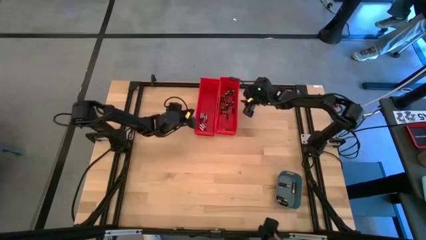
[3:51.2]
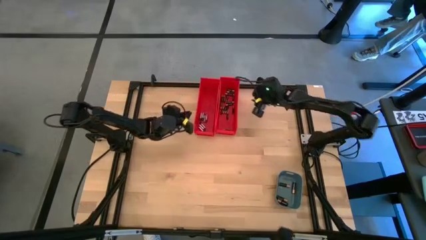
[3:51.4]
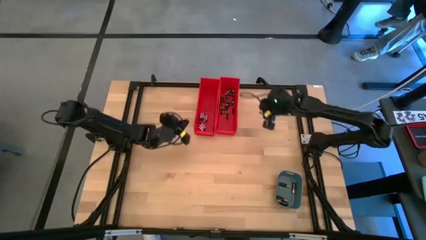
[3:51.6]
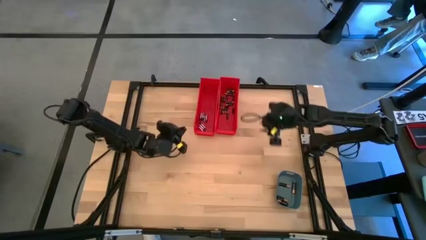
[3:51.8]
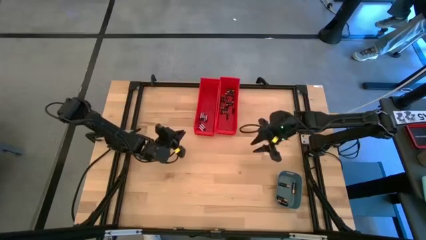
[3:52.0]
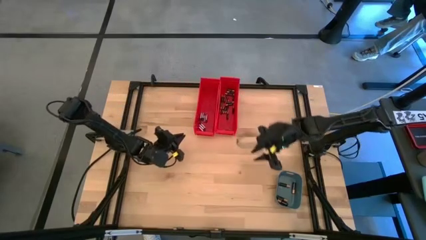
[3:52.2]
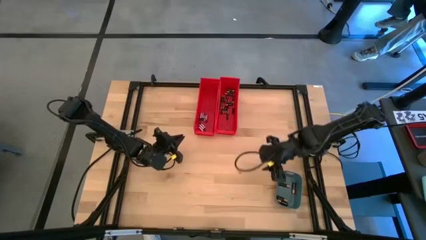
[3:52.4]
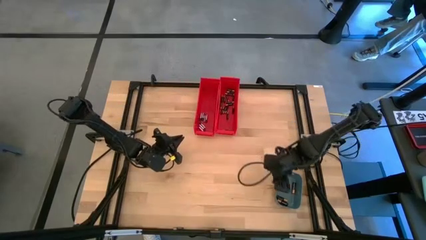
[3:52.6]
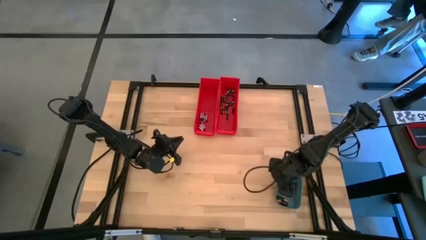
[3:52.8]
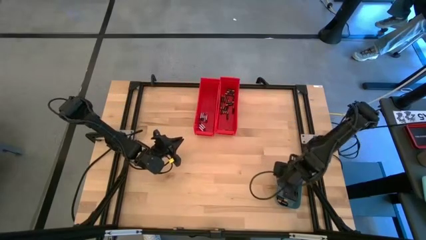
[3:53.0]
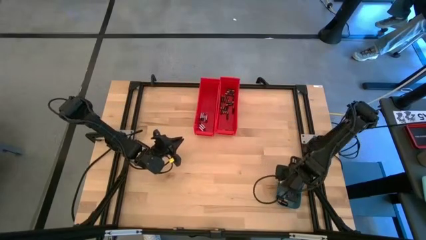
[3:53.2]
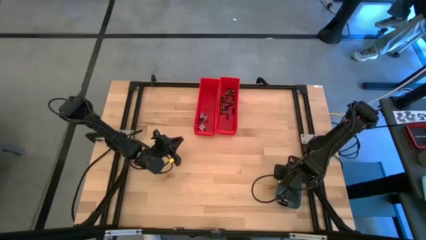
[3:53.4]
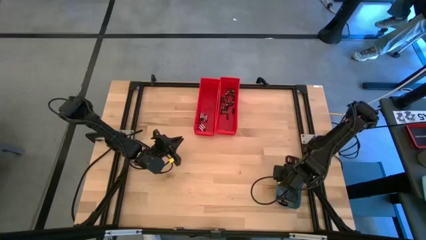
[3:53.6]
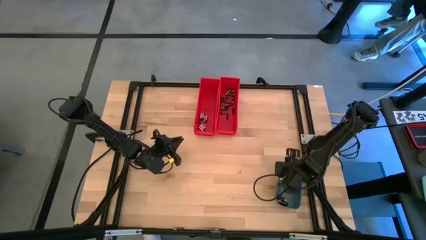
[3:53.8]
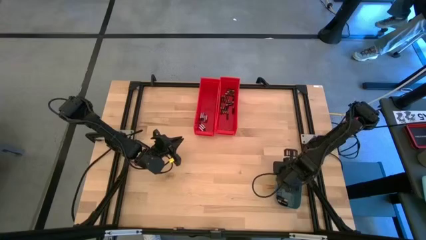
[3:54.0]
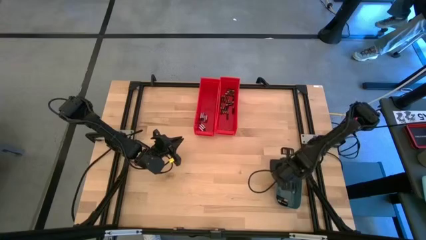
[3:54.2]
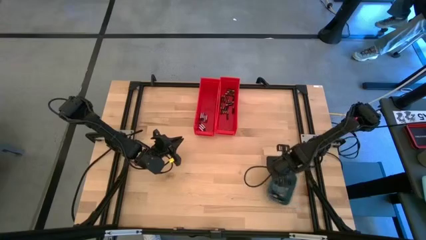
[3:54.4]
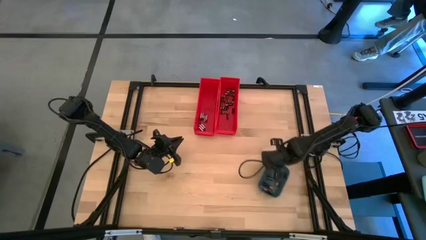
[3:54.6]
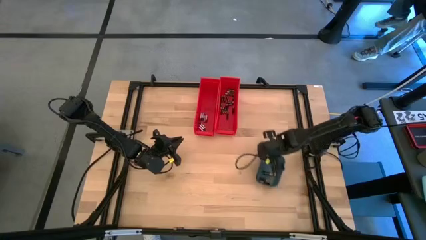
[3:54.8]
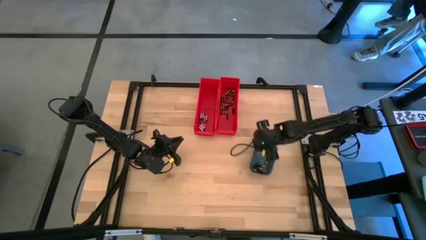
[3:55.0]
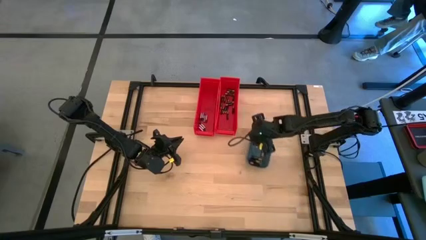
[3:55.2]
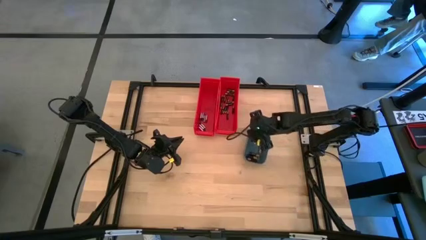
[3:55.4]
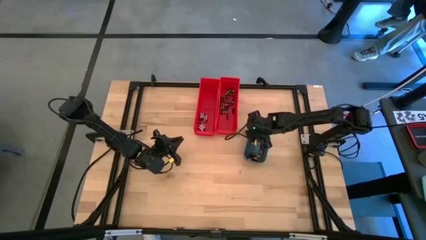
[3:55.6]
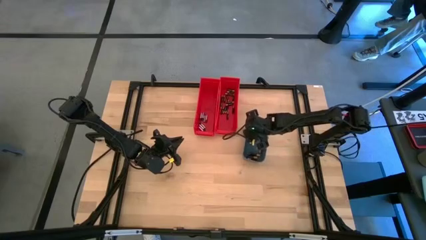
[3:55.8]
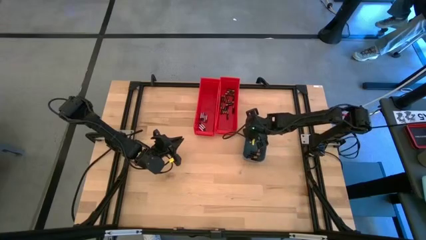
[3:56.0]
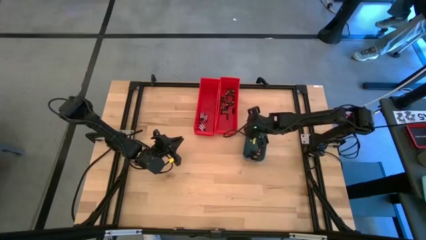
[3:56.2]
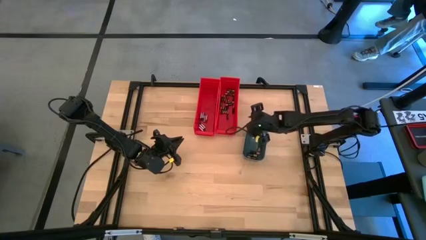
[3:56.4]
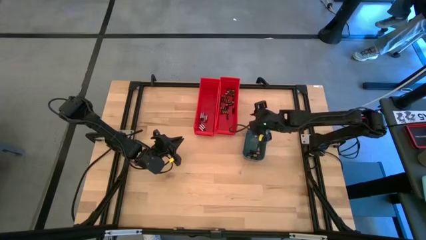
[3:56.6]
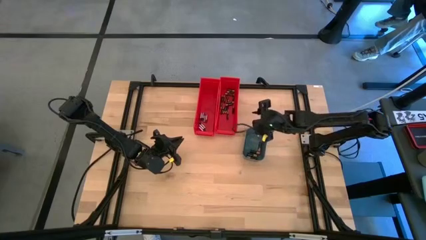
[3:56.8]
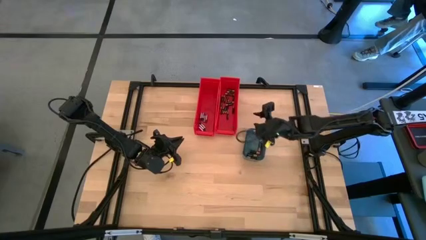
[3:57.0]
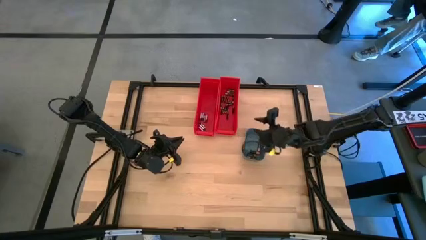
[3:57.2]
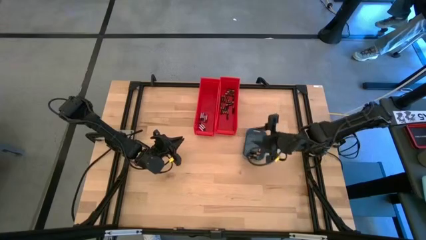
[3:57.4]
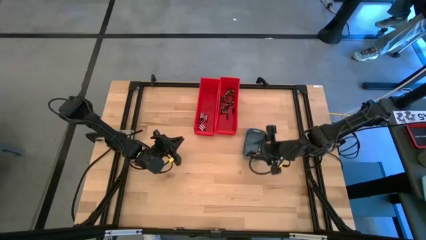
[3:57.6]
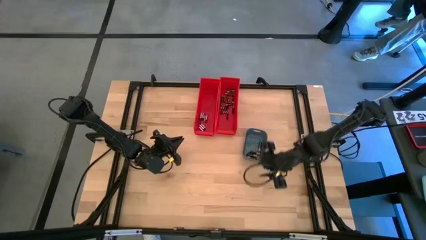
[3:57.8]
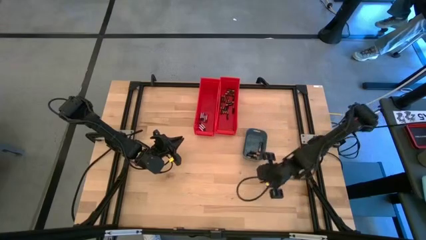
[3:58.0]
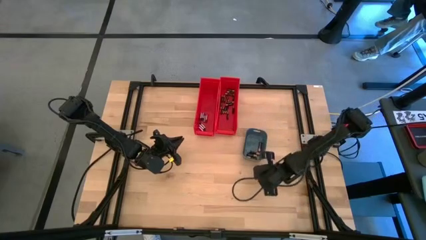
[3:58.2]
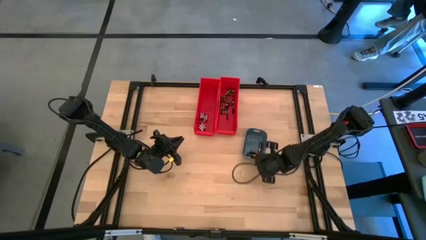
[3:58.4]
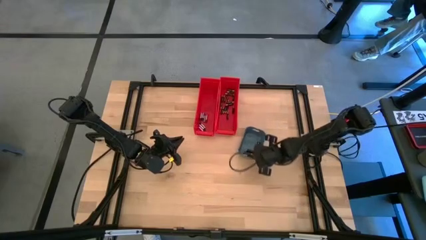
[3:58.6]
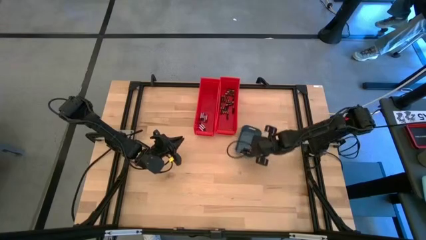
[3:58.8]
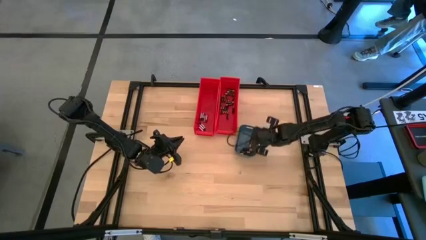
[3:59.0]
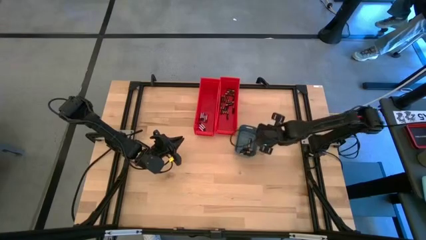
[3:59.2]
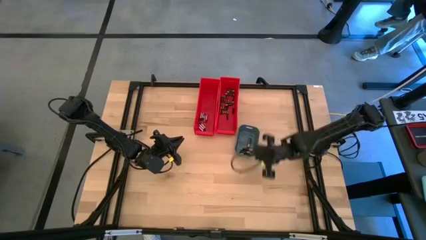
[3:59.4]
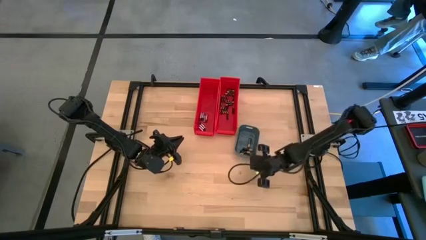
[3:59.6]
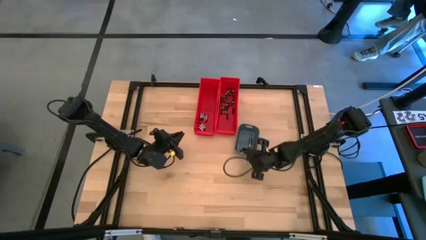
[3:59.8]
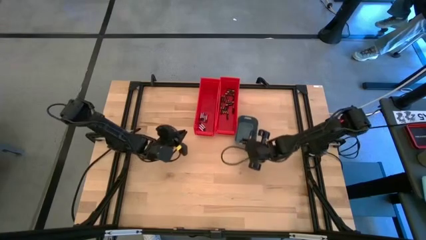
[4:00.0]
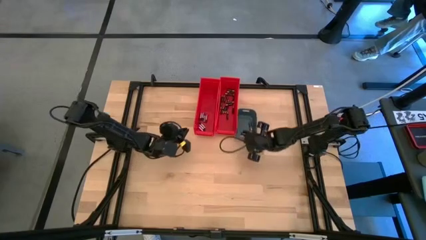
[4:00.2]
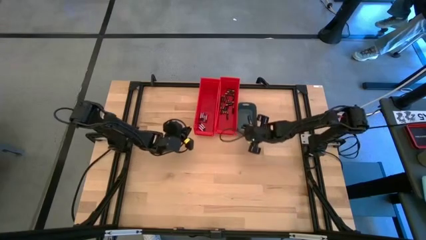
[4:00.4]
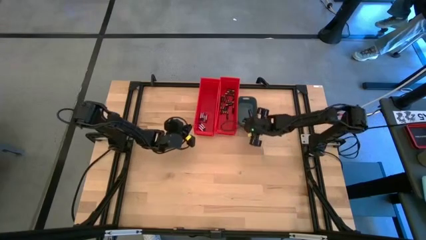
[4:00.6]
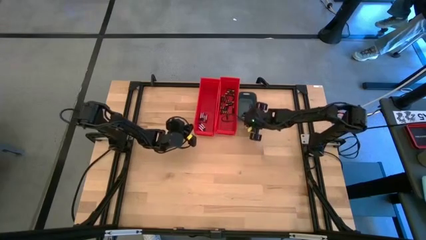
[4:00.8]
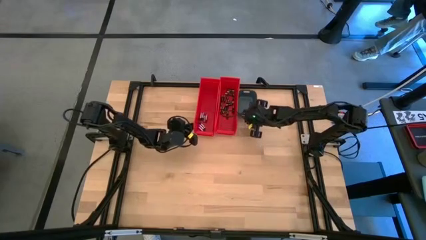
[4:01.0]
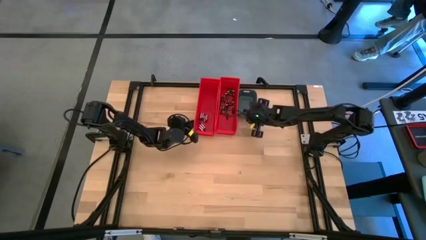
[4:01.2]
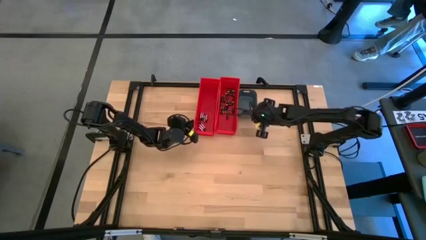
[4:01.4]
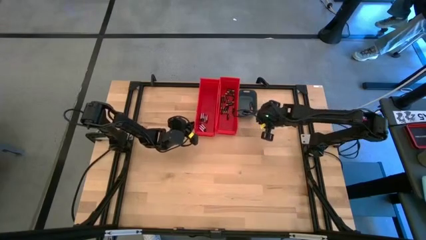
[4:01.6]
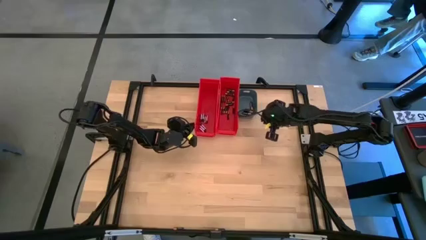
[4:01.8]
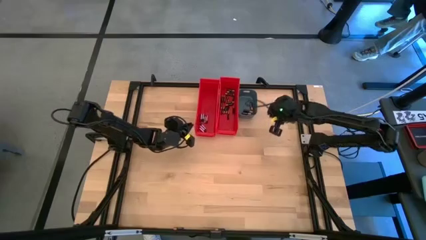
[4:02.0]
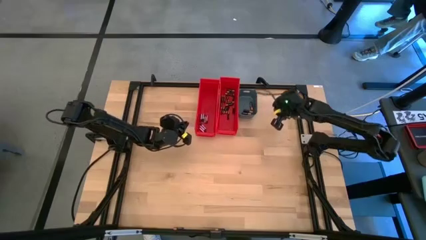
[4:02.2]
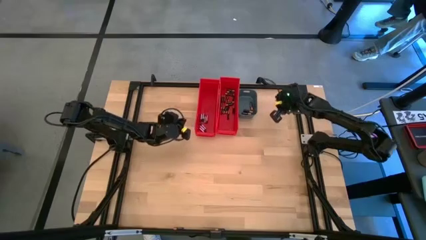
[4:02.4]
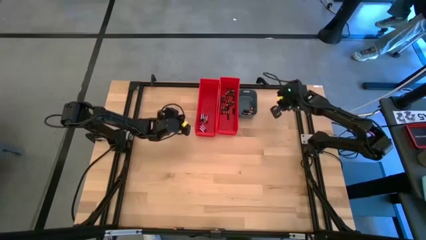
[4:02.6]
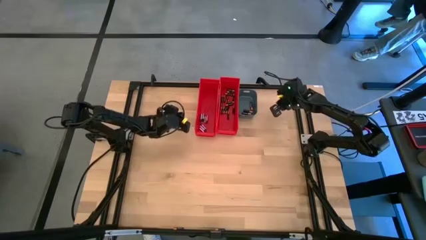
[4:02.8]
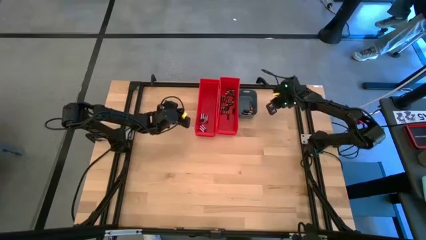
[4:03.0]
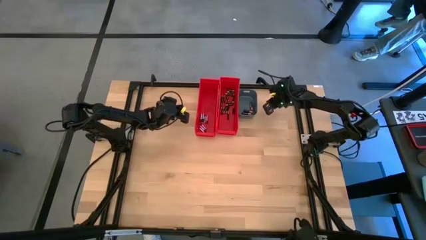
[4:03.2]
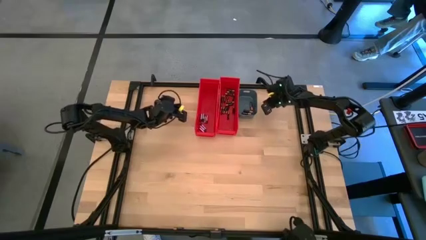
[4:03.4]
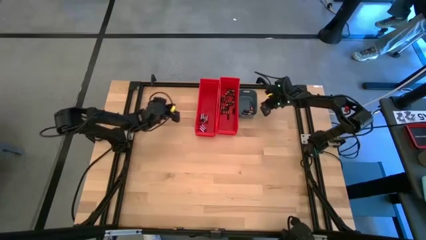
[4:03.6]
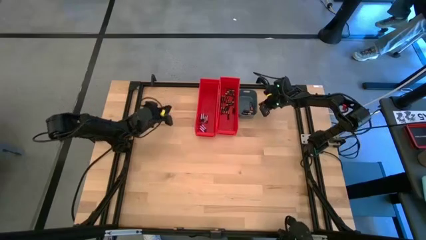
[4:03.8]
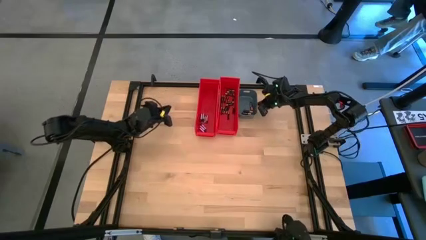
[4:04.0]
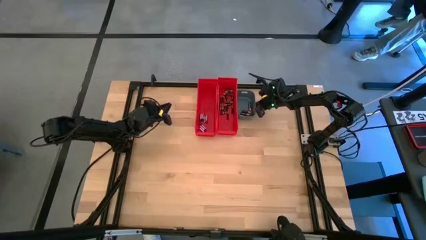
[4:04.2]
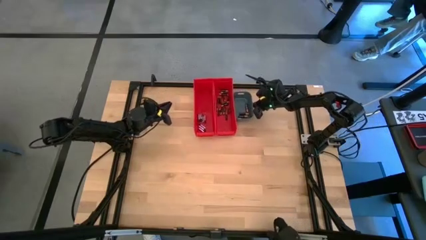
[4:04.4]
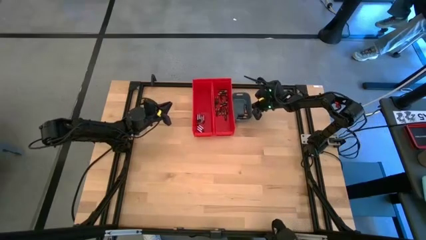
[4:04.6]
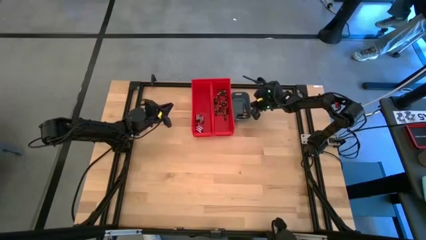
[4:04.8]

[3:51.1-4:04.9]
Task: Sort batteries
Adjust the blue bin

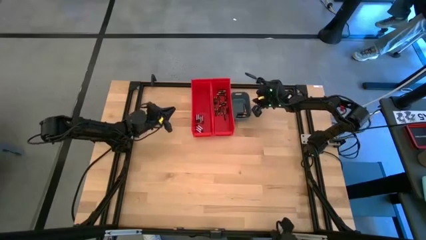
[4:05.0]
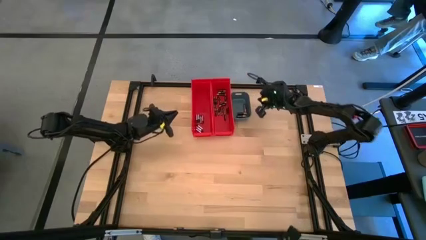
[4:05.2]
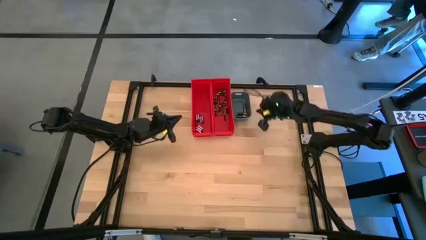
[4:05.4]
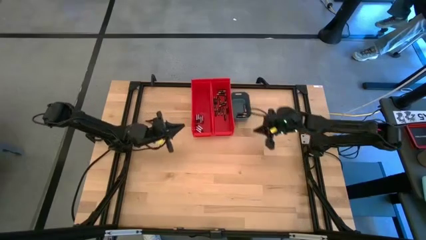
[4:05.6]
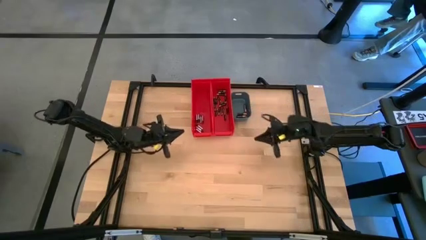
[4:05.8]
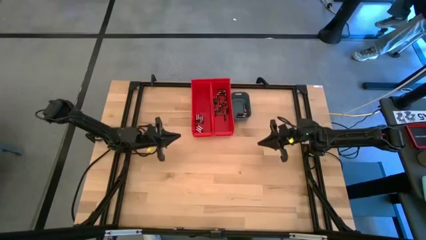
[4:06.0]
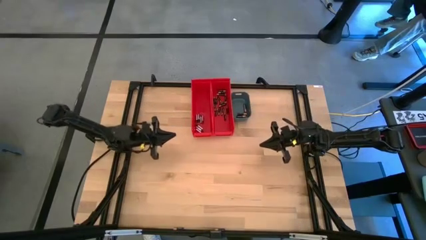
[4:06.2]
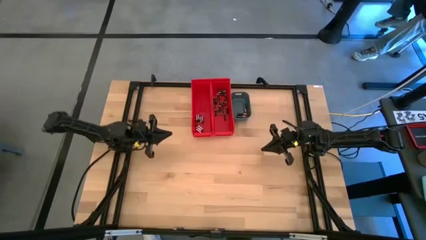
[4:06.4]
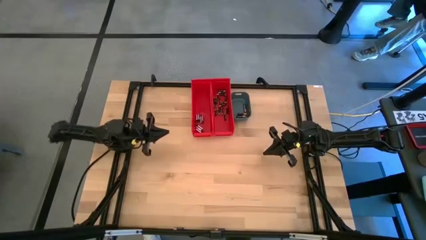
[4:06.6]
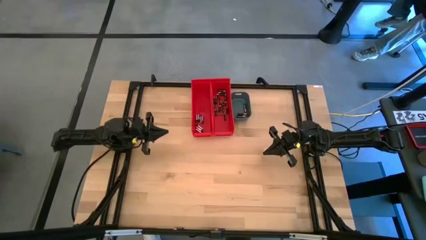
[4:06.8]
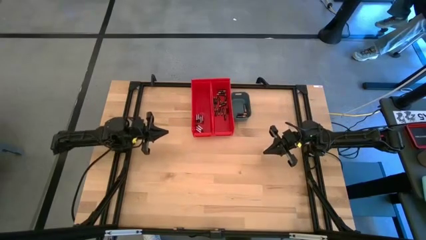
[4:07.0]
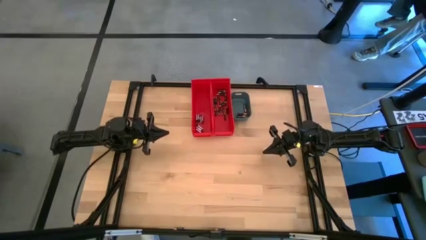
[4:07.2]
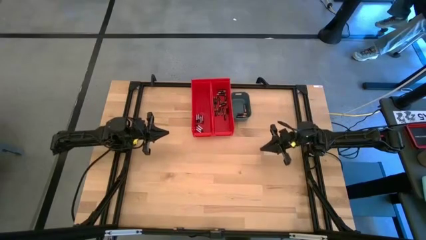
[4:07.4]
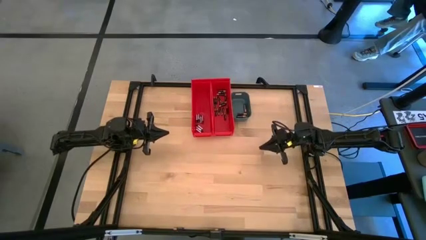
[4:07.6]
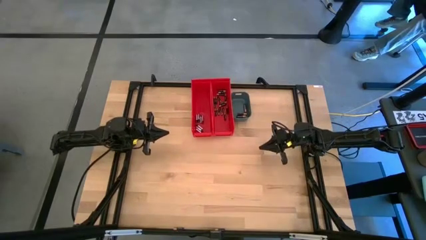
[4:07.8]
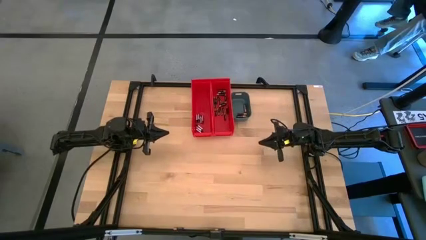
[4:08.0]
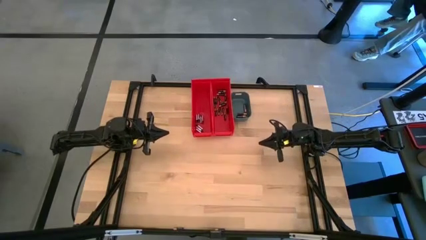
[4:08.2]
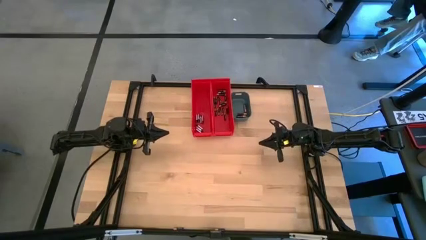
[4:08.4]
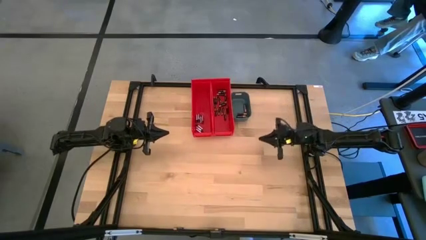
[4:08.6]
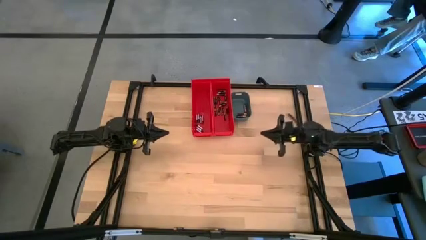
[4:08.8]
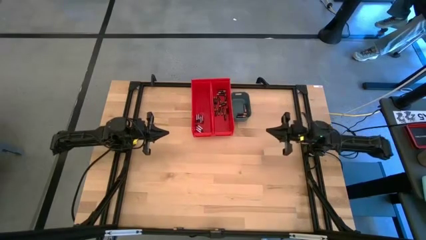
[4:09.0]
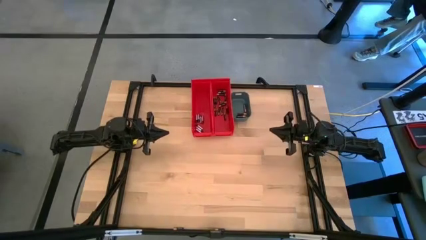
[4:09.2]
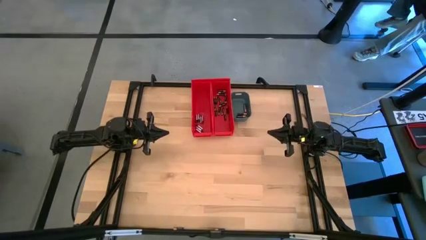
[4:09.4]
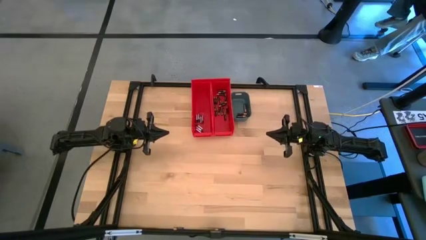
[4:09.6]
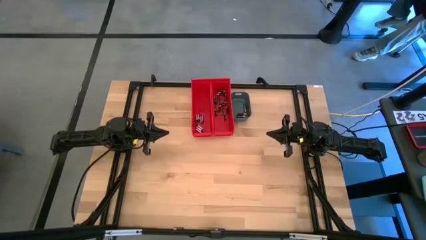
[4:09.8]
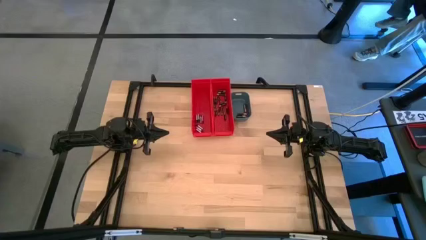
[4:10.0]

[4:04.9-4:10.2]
Return to Home Position
